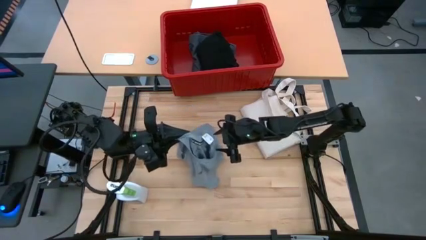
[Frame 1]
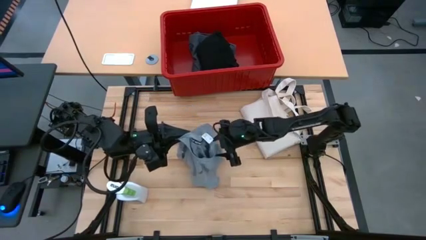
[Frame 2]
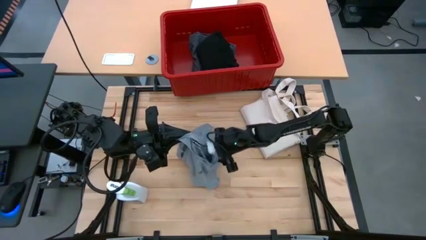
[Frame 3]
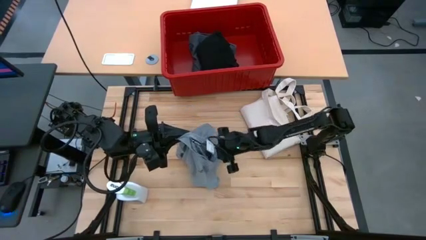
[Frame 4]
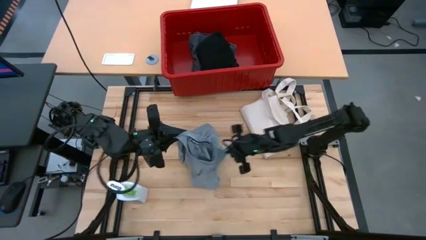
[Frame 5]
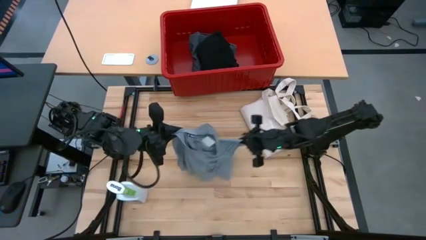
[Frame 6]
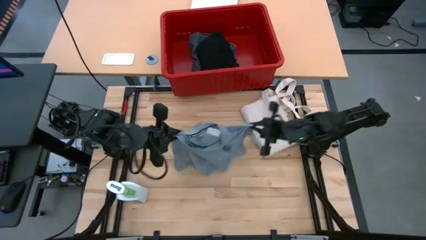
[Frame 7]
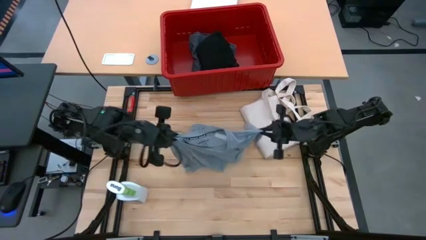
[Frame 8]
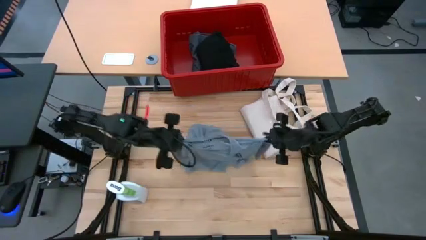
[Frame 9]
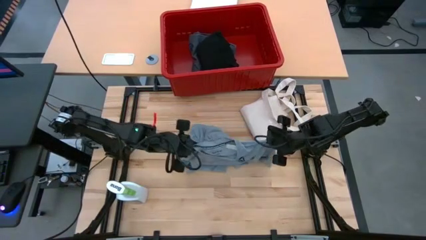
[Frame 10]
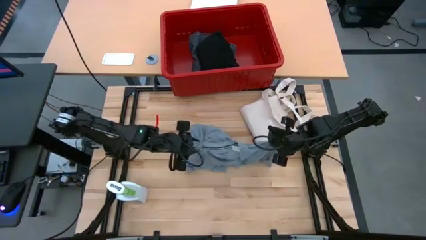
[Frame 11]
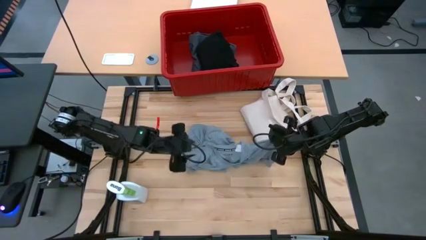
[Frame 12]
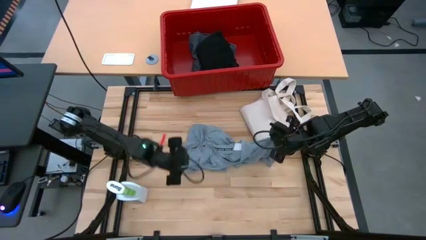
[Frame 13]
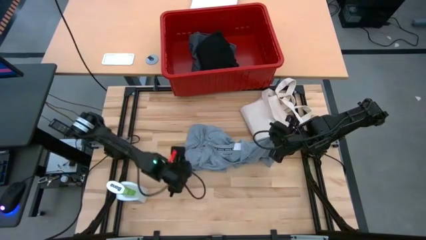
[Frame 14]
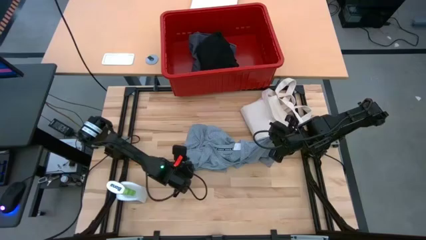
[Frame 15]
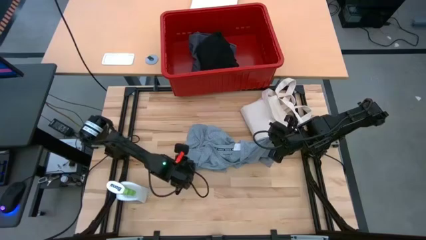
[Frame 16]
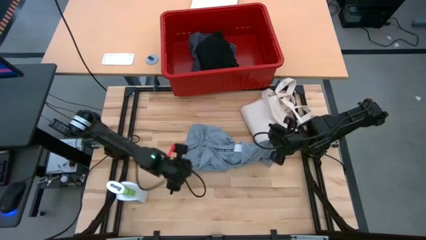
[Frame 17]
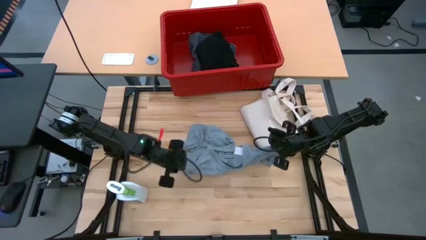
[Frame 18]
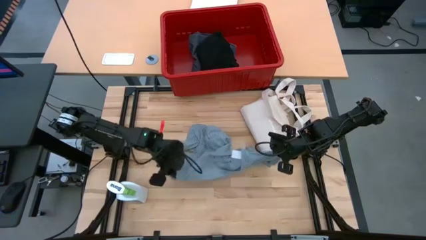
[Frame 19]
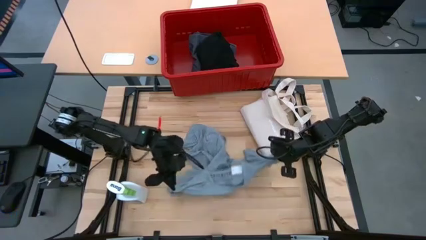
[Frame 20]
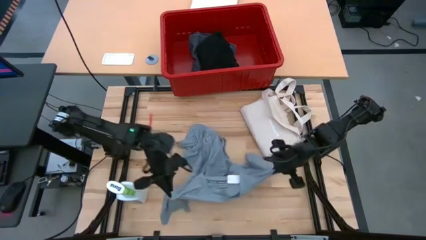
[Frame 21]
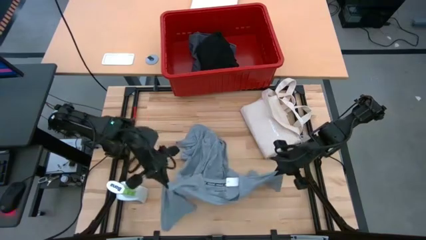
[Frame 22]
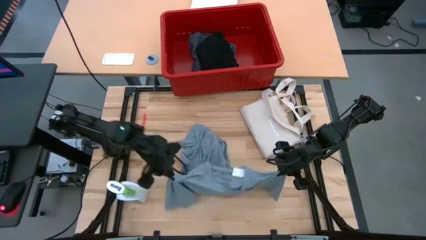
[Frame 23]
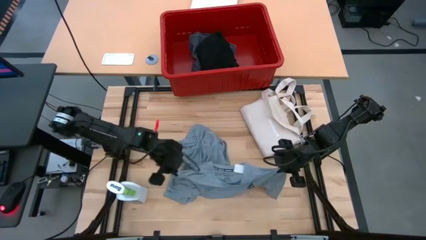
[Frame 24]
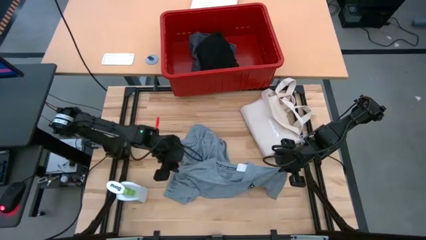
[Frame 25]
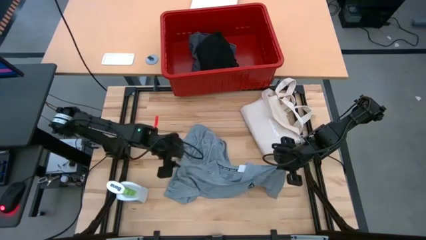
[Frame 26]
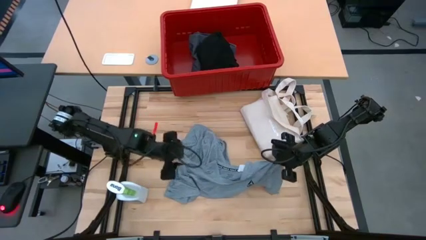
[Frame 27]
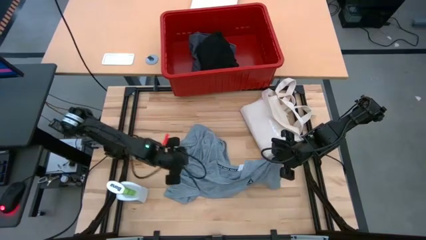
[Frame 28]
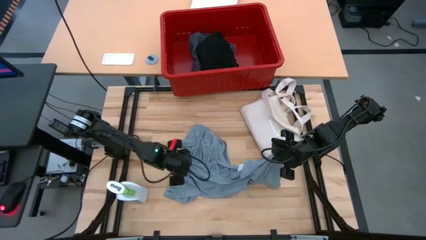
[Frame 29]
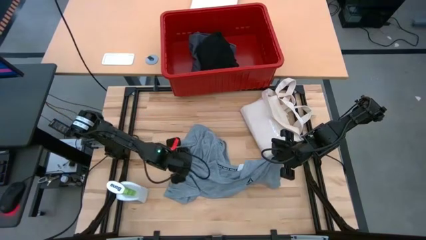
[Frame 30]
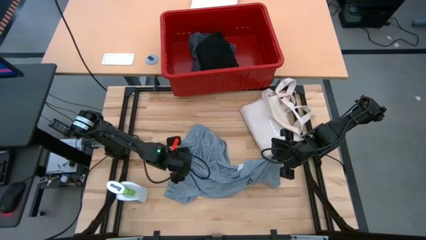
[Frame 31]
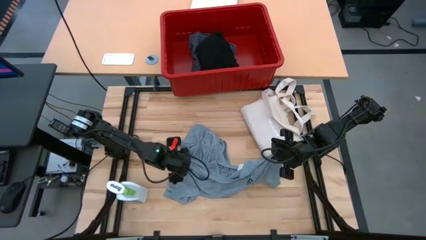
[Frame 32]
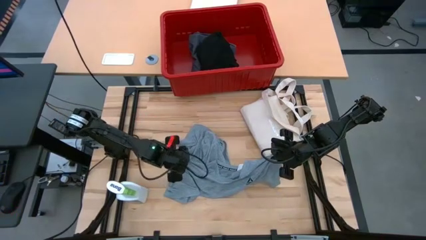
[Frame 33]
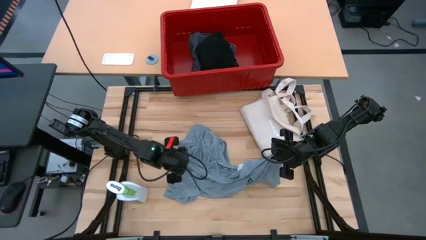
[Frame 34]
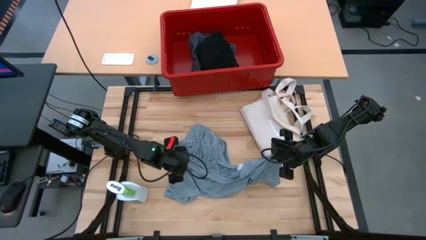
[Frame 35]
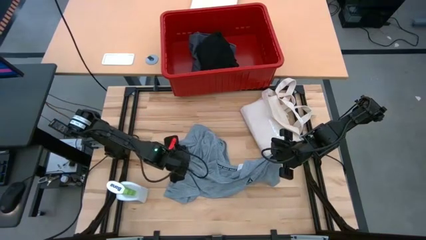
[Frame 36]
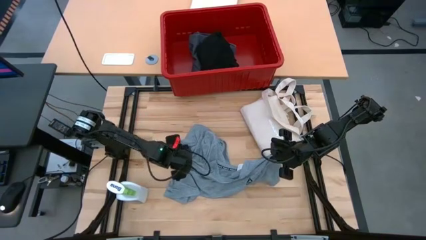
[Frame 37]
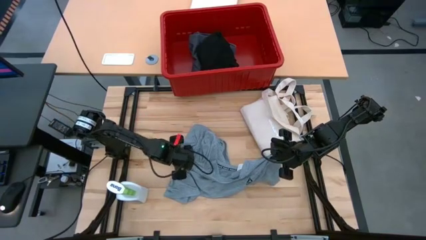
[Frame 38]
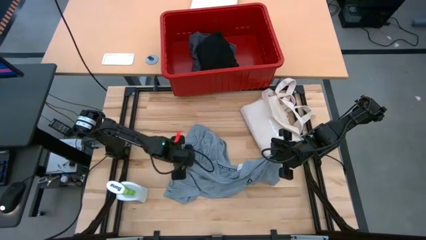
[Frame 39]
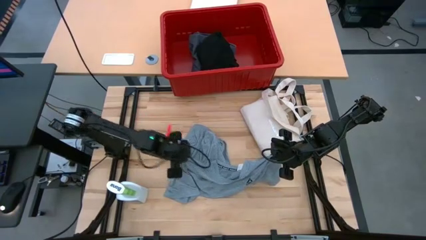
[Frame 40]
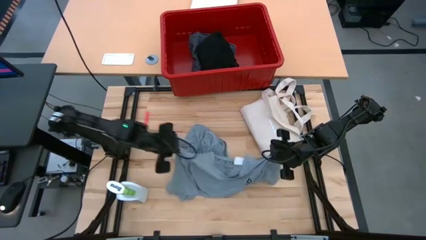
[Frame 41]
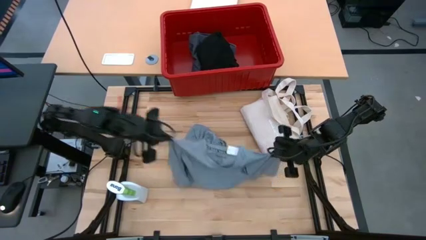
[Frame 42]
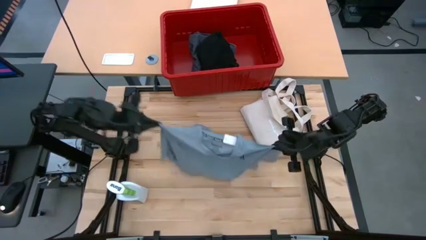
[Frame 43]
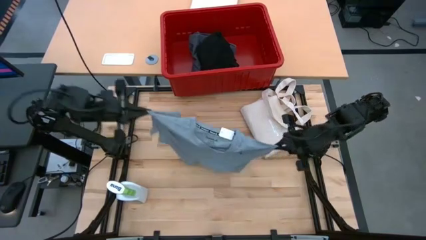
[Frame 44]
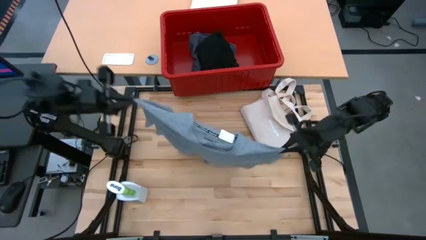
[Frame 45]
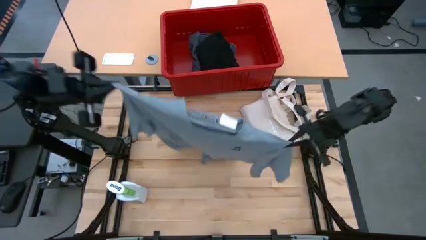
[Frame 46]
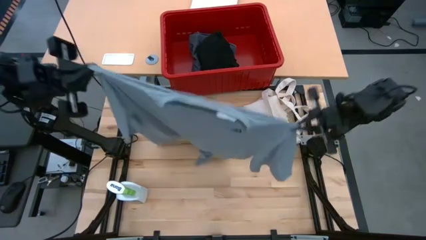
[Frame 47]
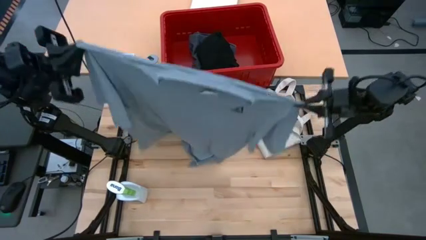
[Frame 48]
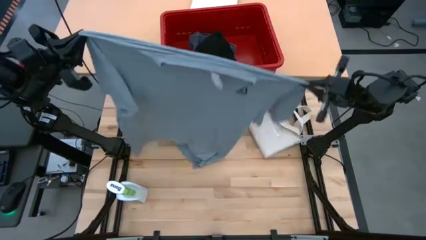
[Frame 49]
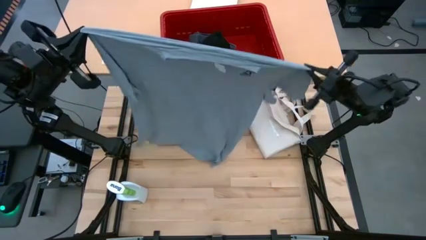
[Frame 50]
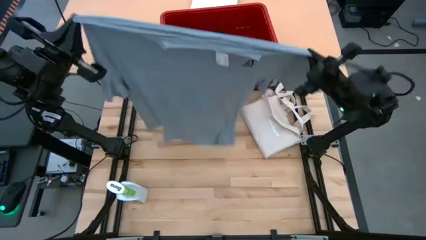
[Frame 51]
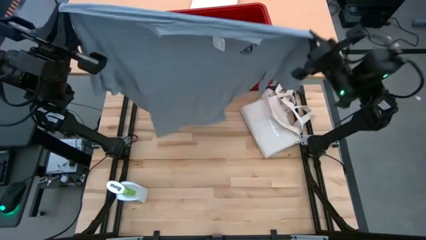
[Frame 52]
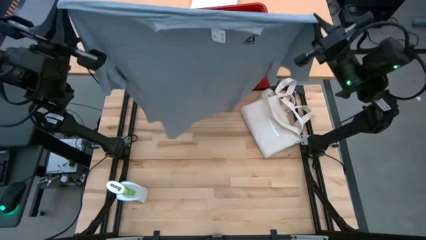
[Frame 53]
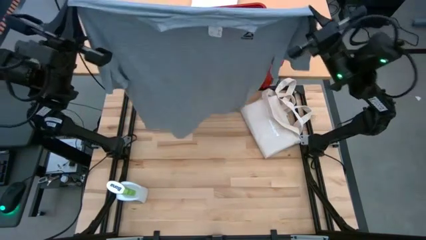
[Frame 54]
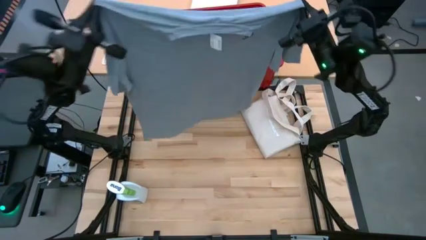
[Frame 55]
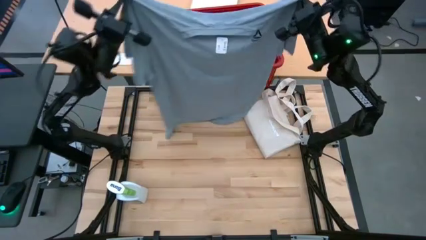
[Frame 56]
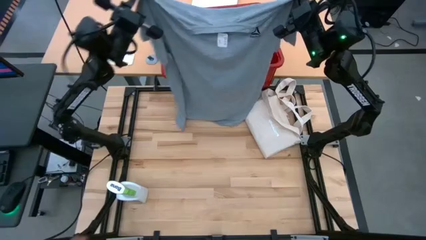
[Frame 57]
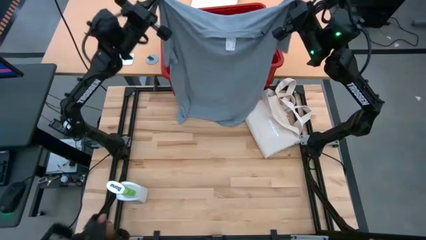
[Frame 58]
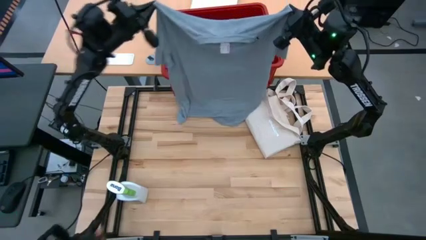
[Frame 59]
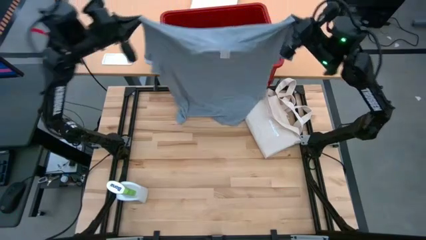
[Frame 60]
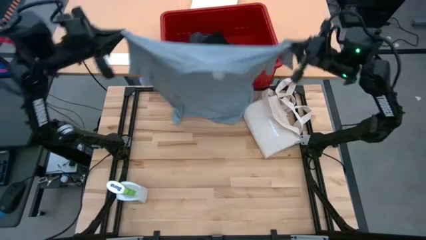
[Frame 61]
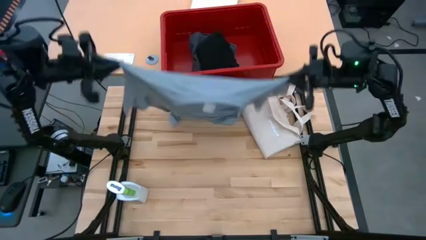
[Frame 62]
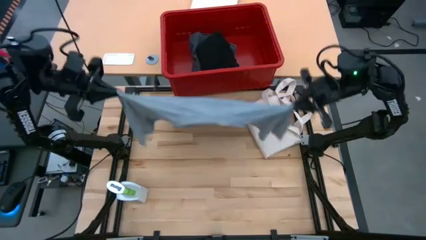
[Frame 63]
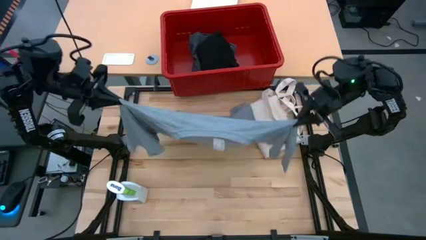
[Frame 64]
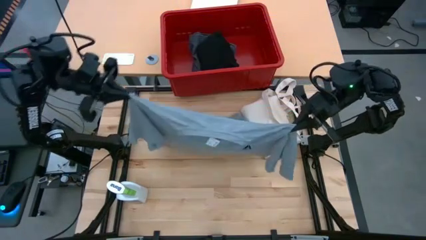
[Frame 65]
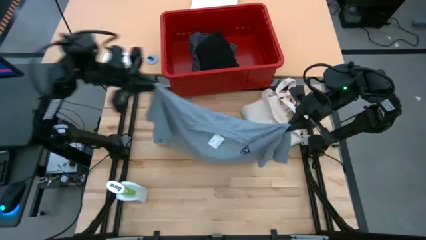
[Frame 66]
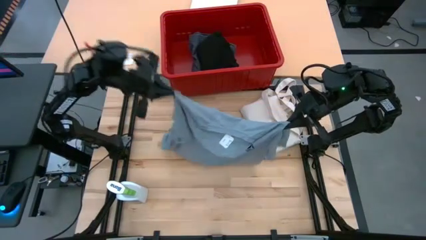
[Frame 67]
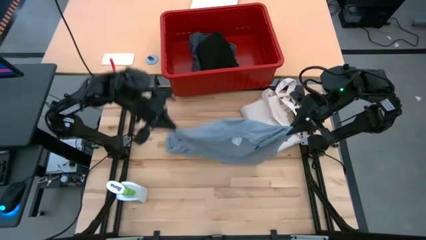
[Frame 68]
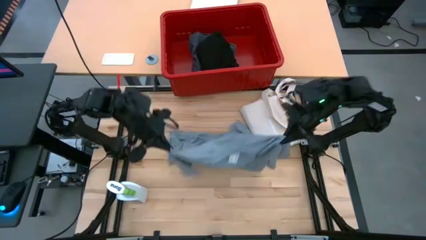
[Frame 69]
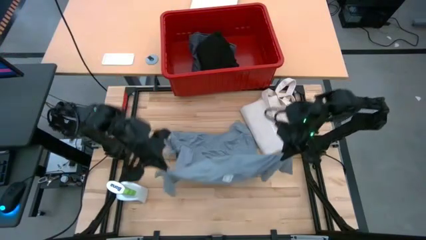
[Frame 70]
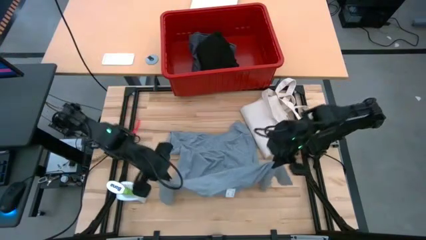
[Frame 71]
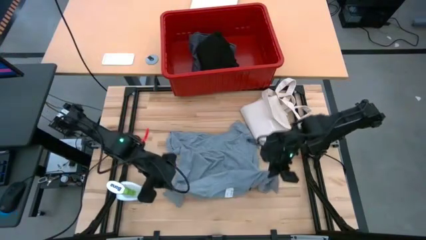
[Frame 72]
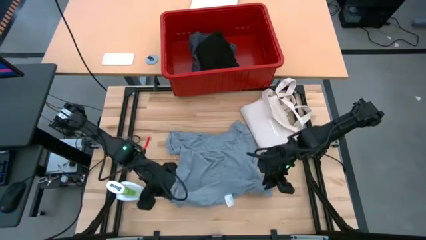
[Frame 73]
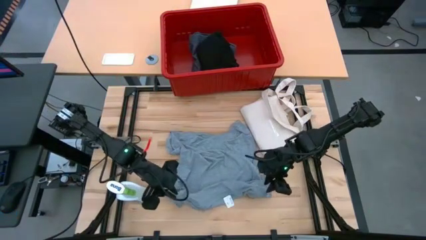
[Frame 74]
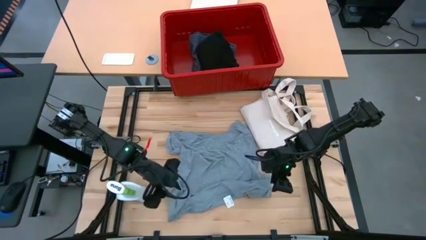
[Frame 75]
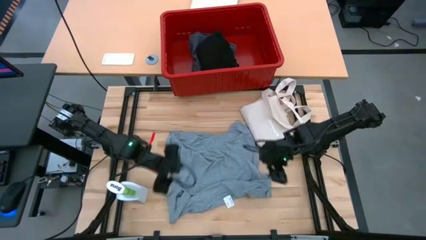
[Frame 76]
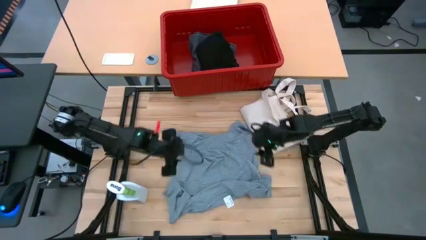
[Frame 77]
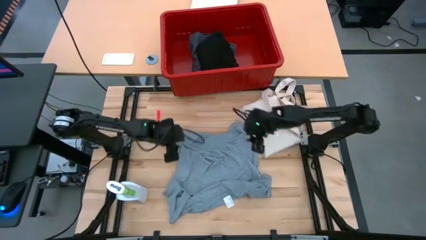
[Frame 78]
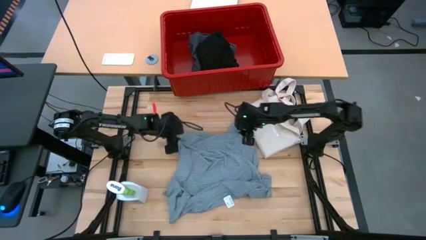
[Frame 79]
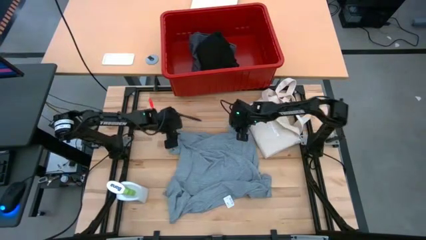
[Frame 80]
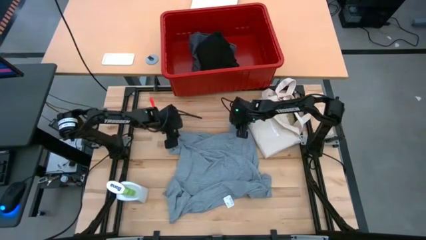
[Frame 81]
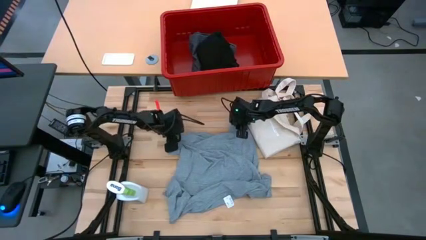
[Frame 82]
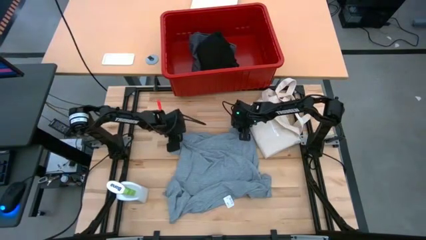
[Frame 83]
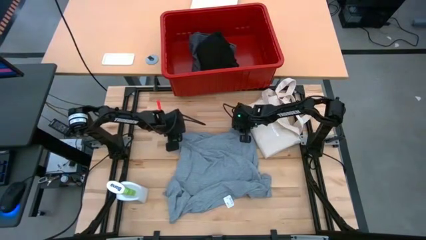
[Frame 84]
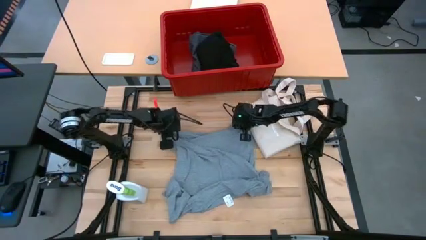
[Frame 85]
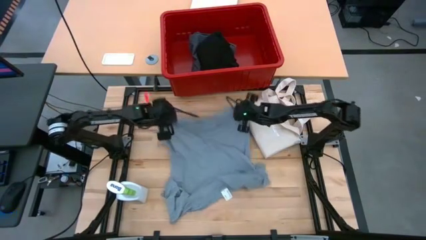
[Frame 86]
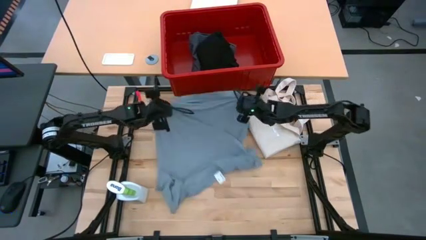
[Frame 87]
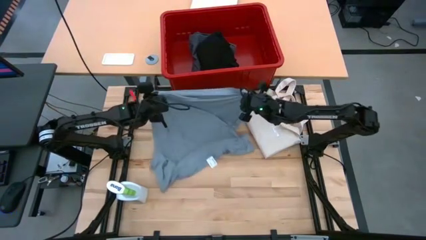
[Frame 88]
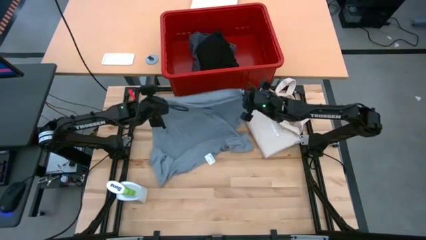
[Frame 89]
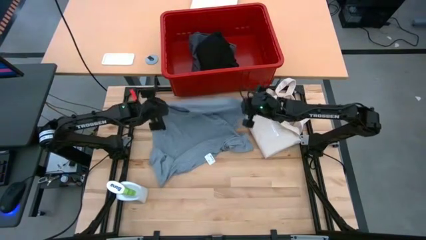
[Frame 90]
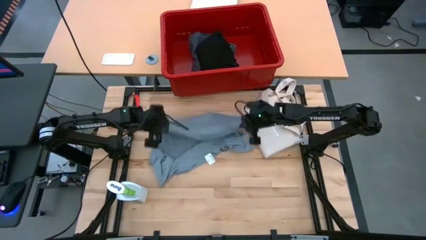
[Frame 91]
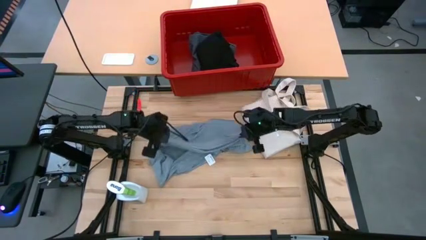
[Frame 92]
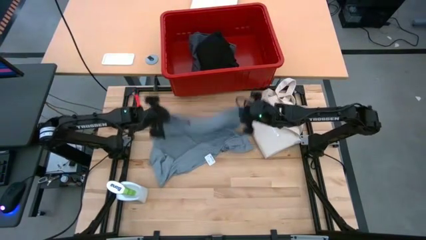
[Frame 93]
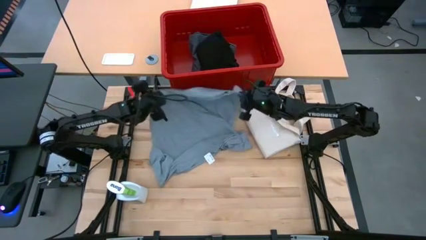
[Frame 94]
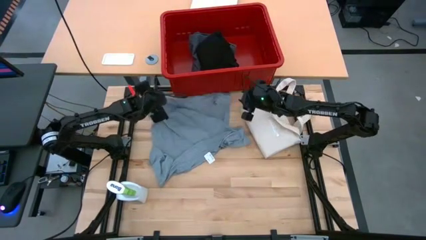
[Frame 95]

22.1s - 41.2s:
Task: Fold Laundry from Bin
Fold the gray shirt
